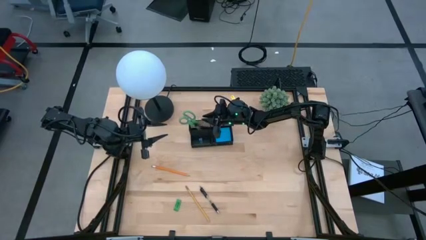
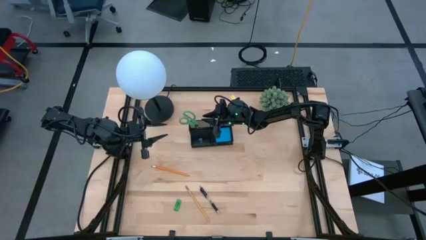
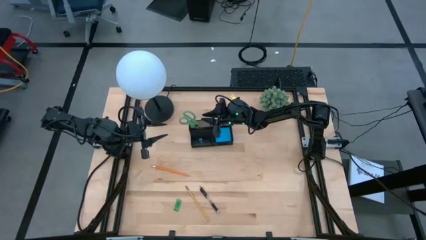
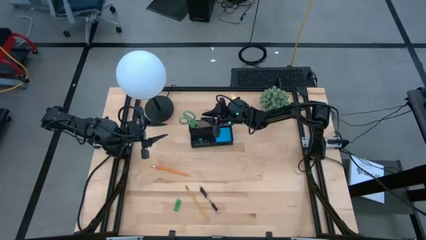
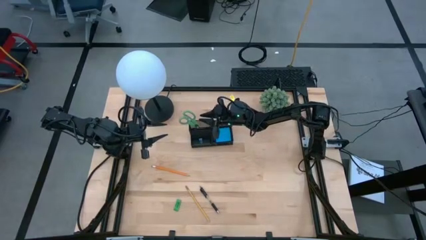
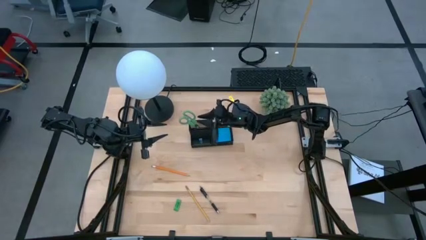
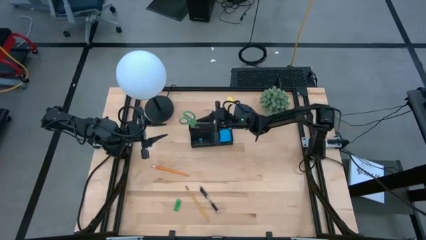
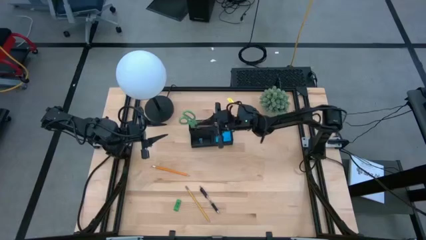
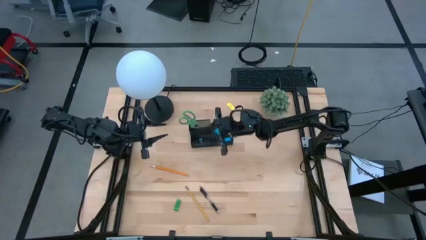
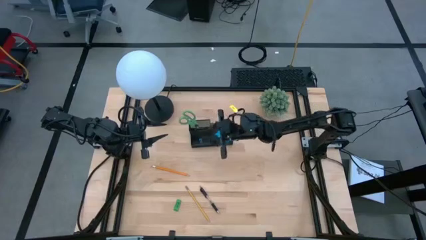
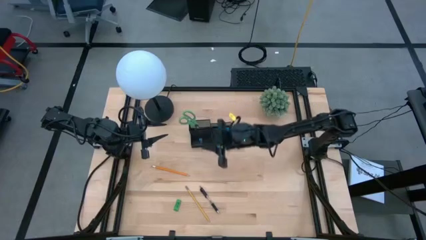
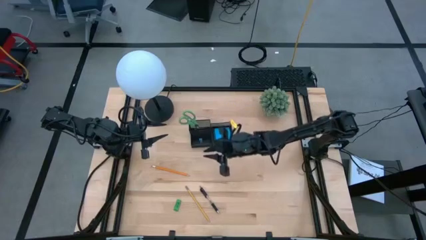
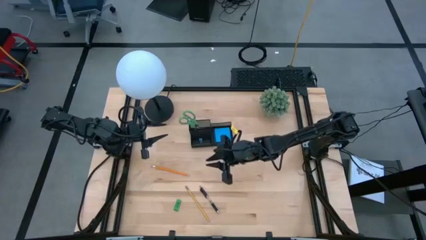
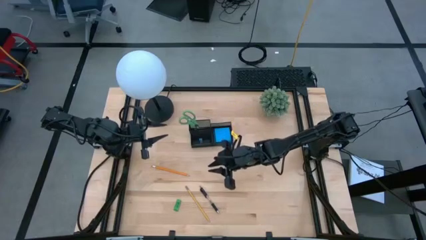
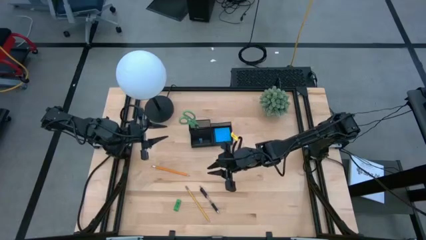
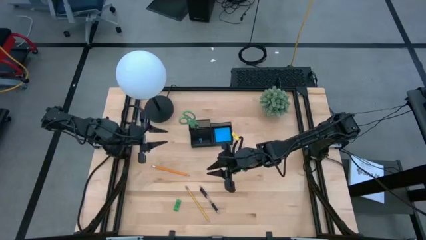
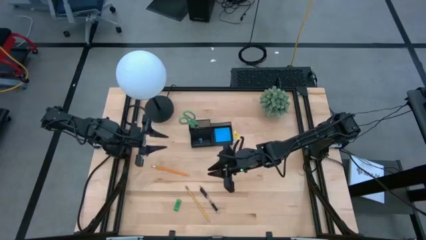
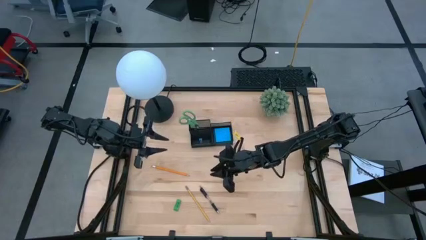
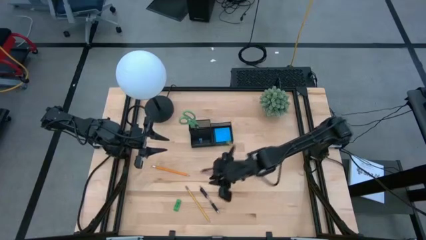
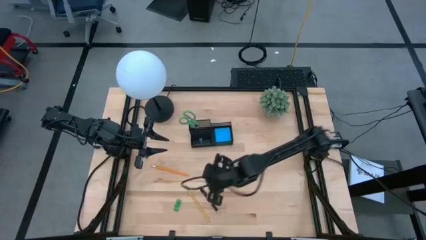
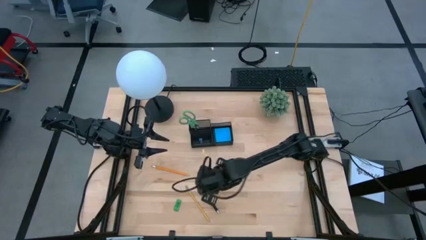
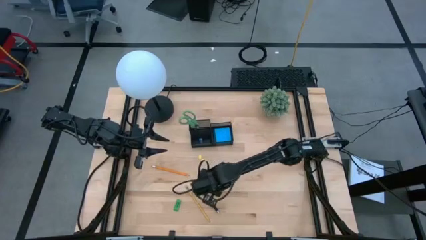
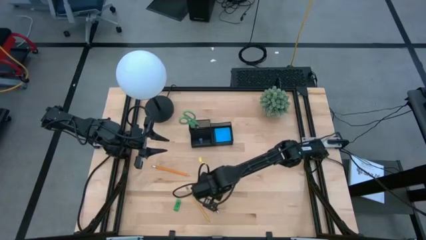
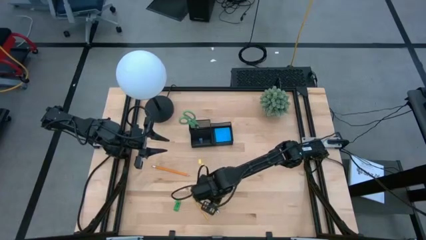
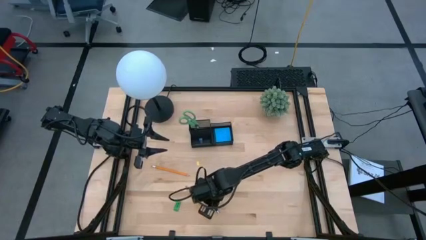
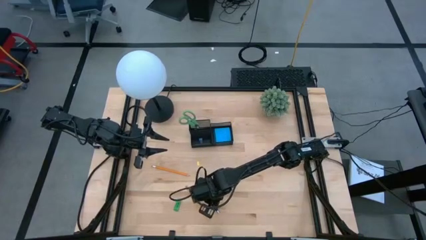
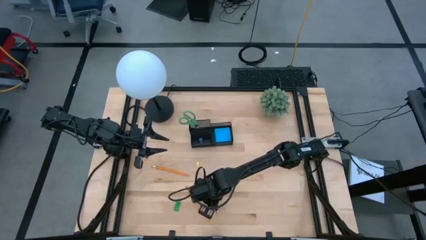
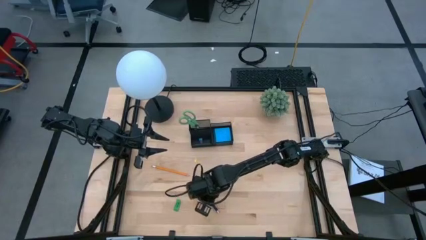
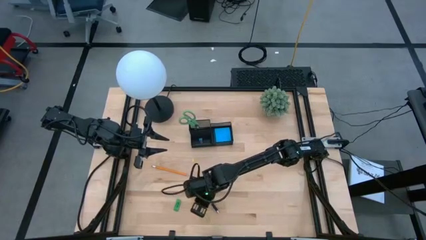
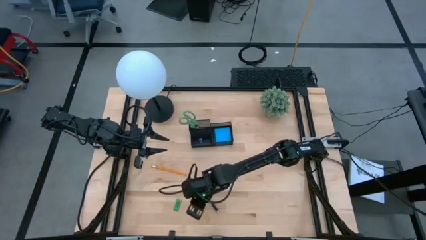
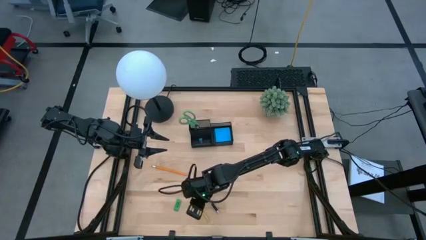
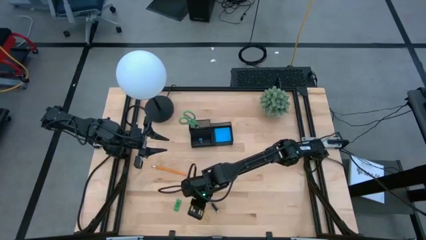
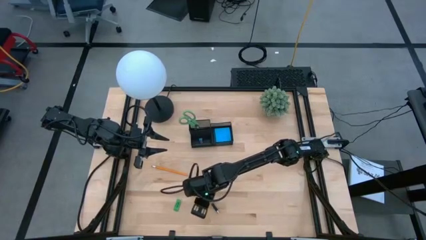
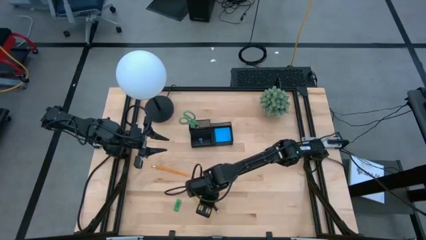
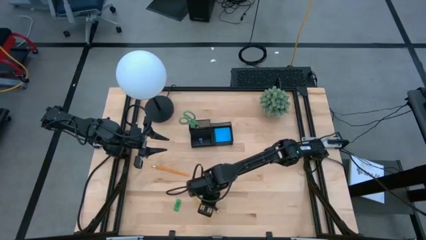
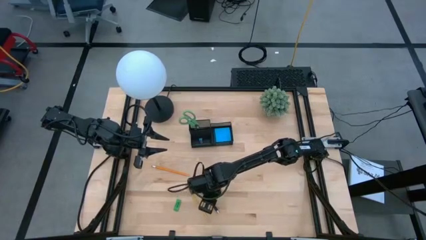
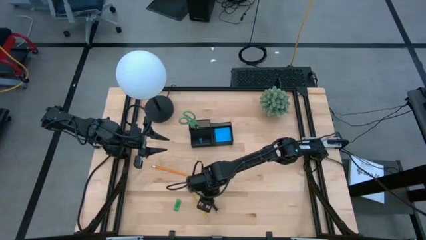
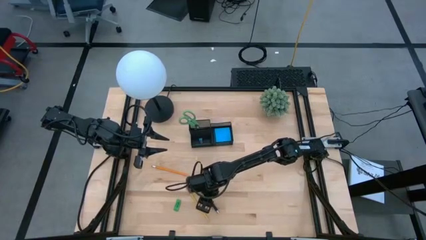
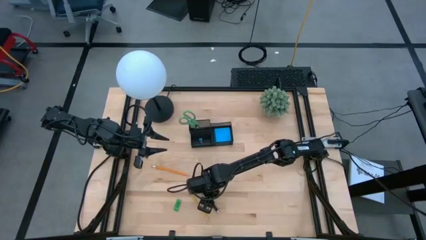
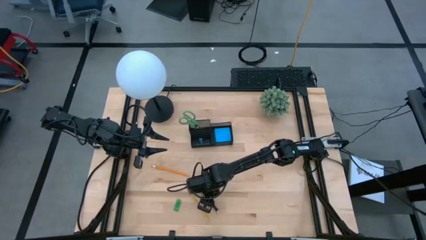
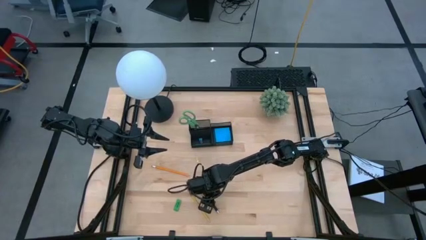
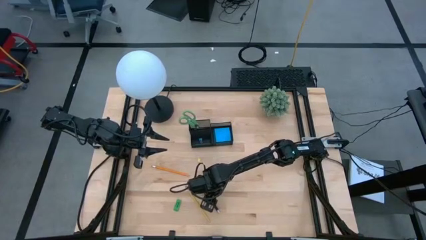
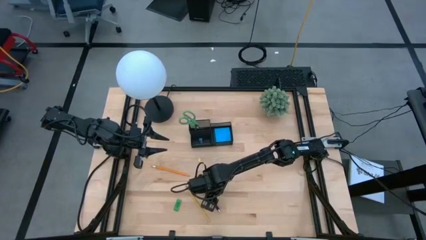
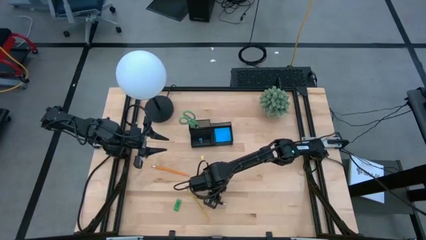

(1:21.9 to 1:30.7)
Task: Pick and place office supplies into organizer
Put the black pen into the black desk organizer

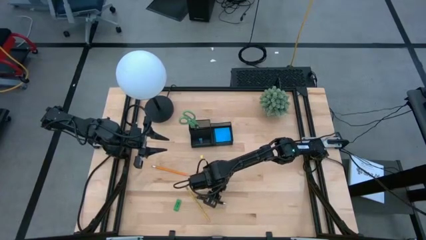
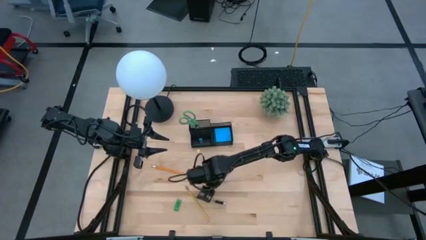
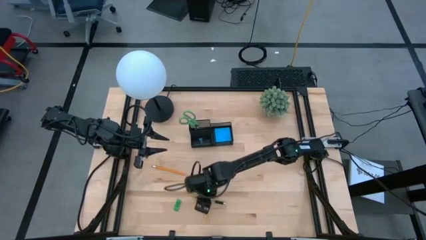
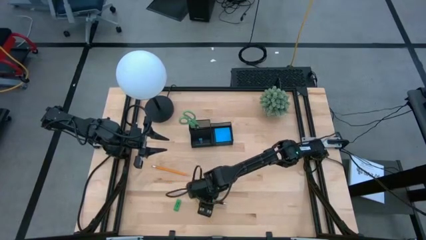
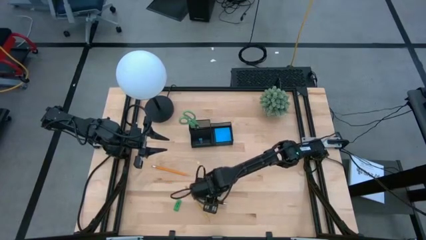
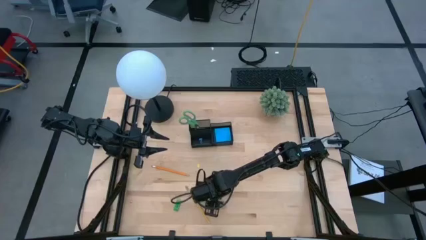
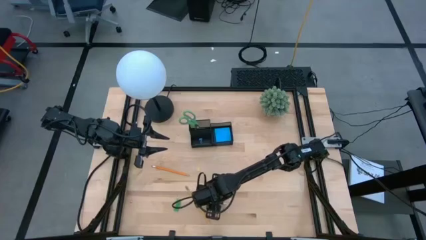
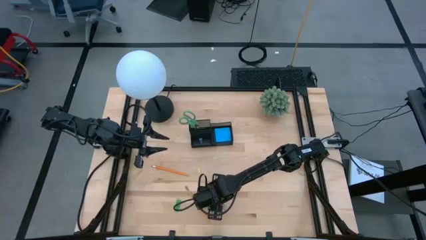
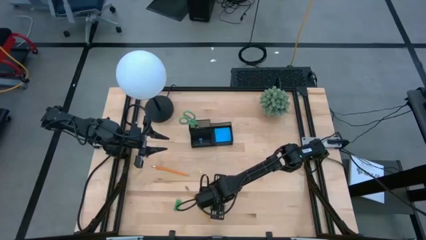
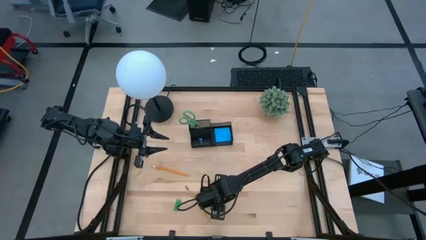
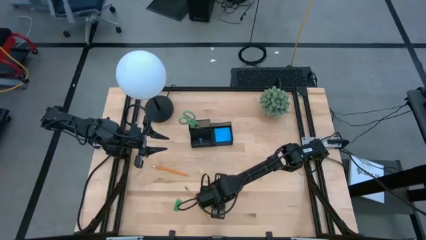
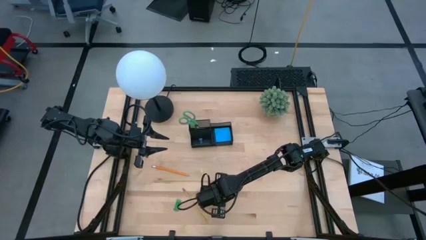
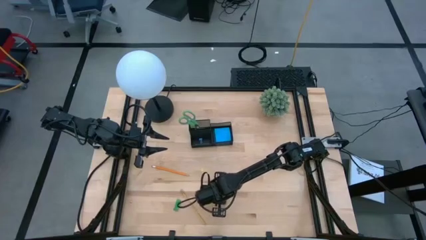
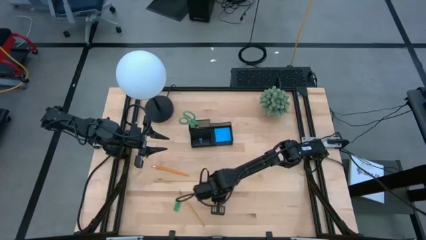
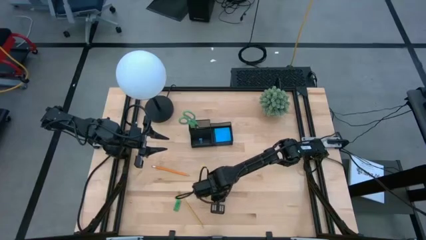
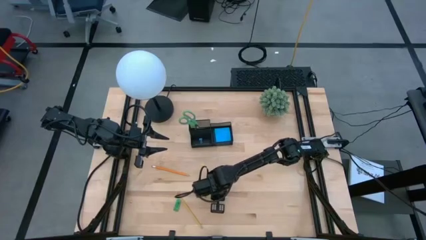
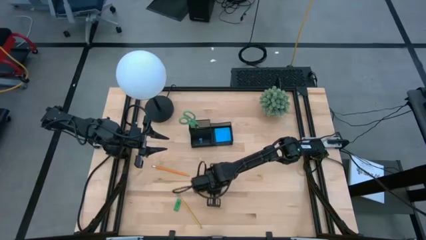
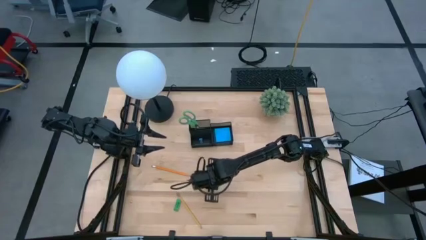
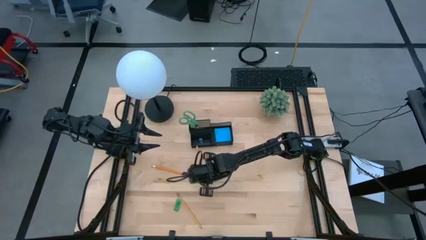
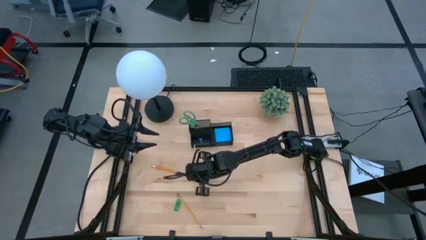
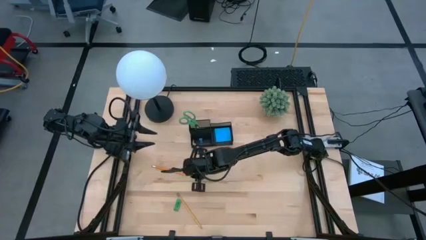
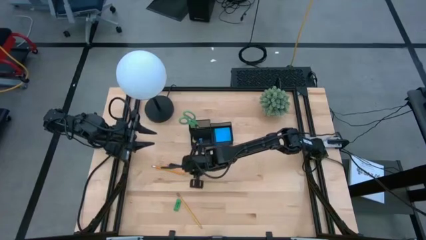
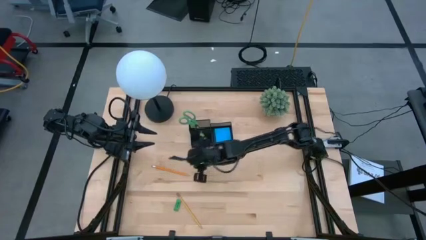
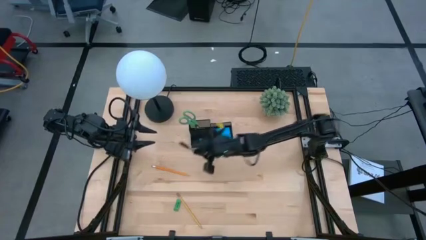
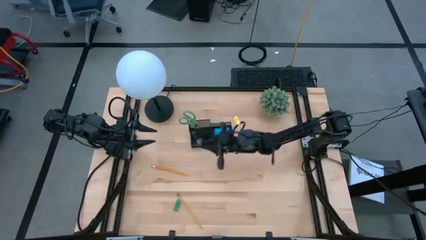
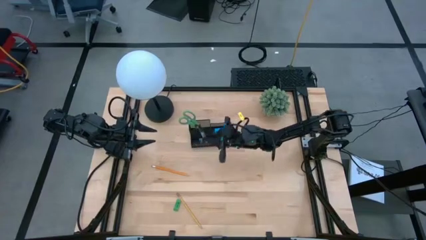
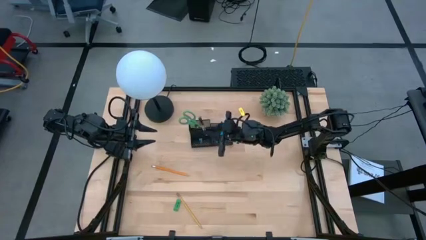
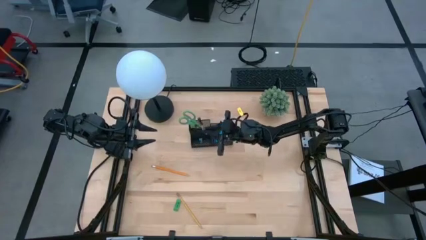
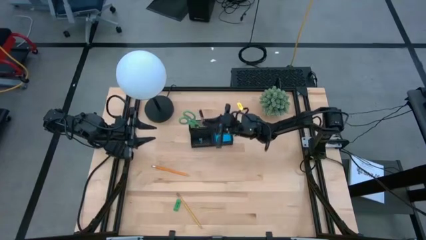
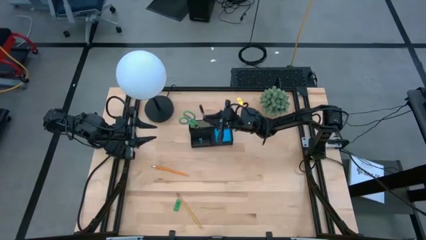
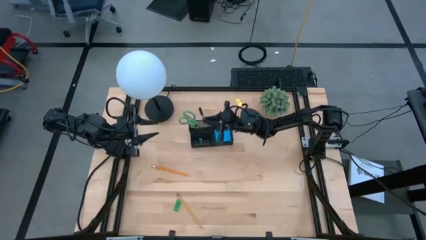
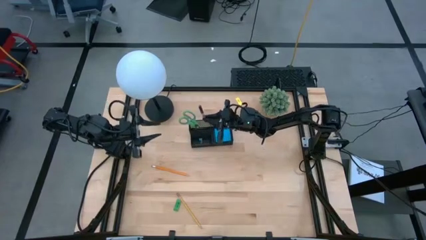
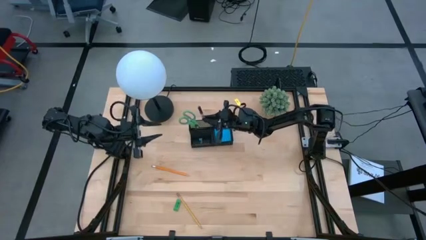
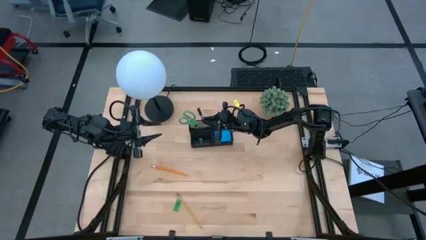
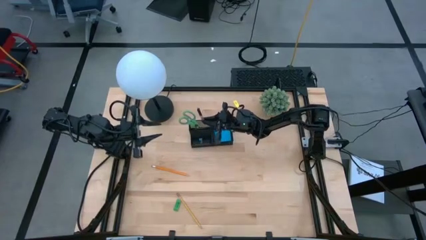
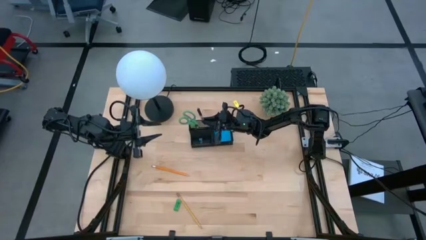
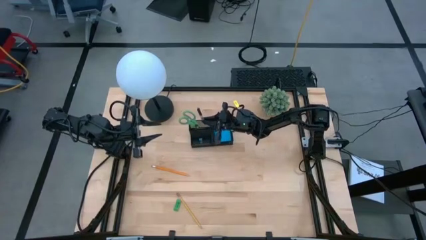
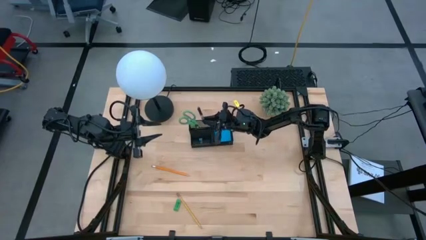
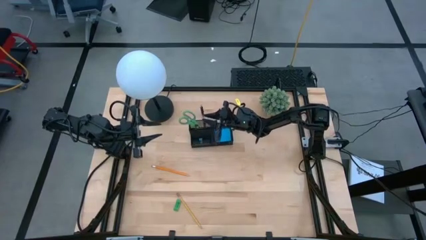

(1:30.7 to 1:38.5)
Put the black pen into the black desk organizer
